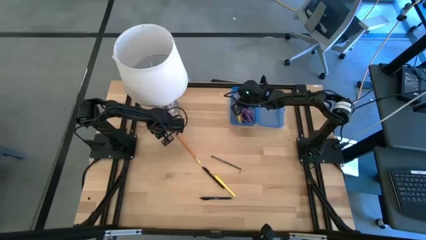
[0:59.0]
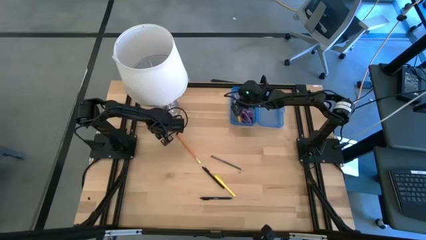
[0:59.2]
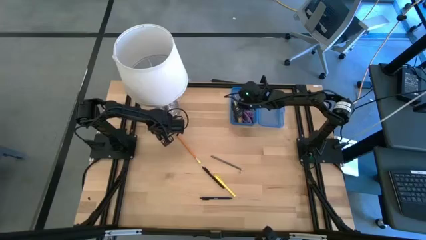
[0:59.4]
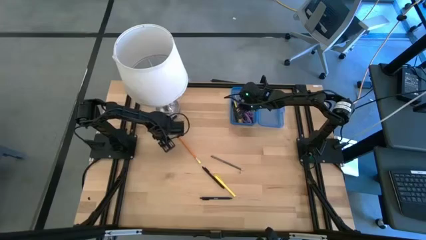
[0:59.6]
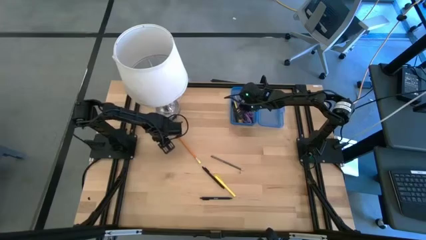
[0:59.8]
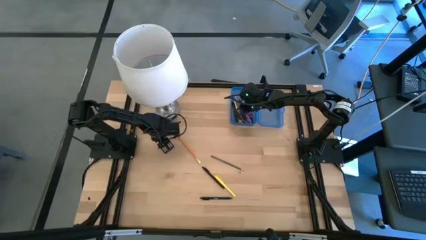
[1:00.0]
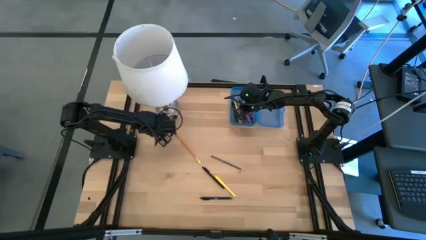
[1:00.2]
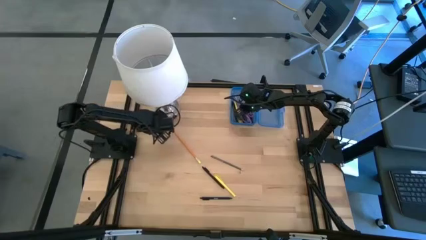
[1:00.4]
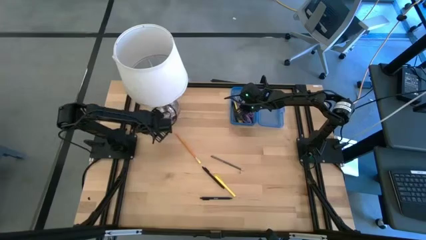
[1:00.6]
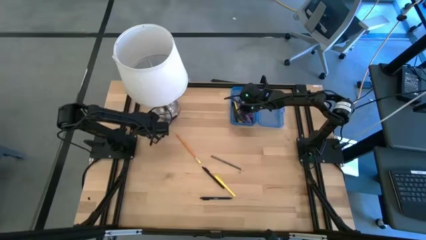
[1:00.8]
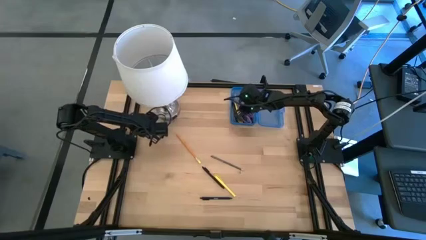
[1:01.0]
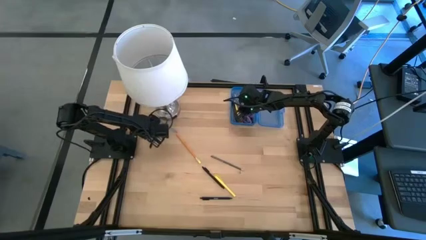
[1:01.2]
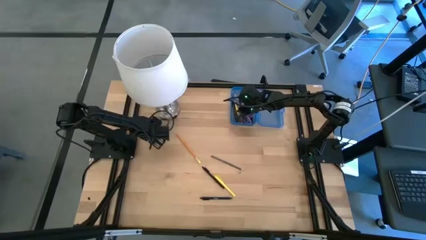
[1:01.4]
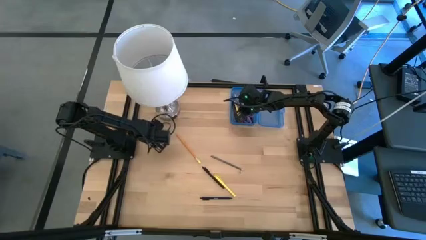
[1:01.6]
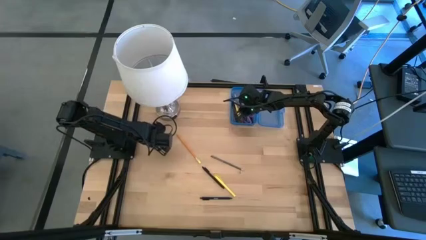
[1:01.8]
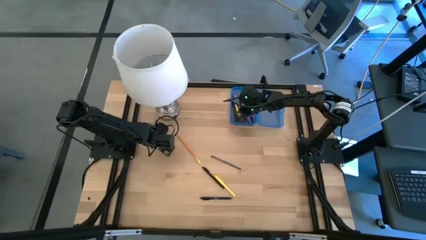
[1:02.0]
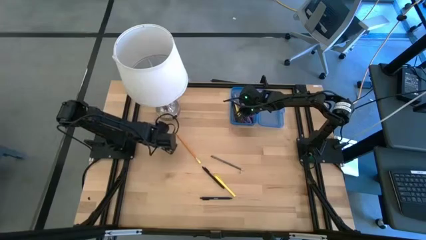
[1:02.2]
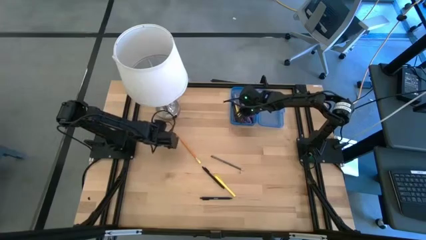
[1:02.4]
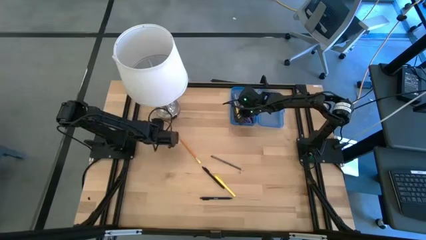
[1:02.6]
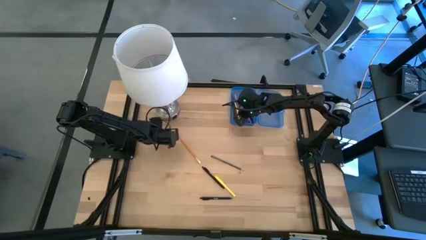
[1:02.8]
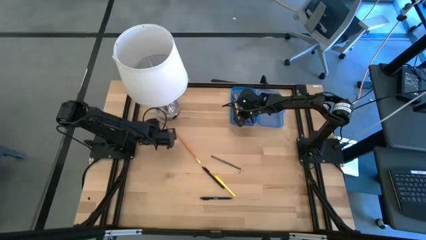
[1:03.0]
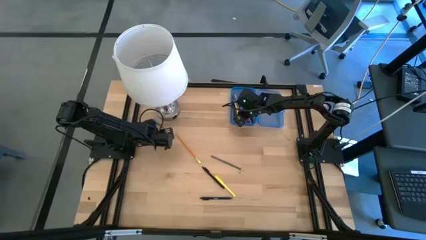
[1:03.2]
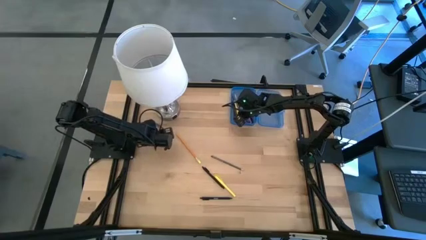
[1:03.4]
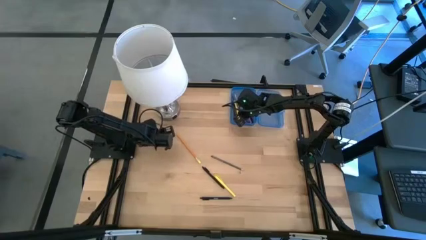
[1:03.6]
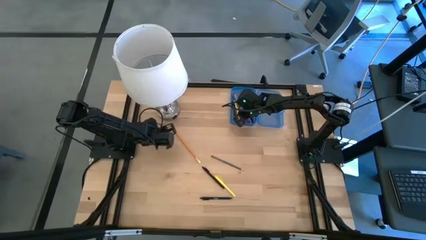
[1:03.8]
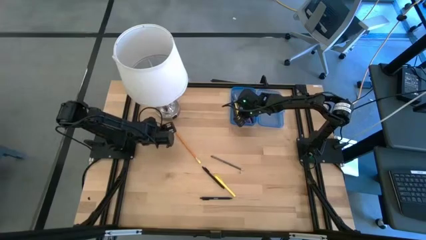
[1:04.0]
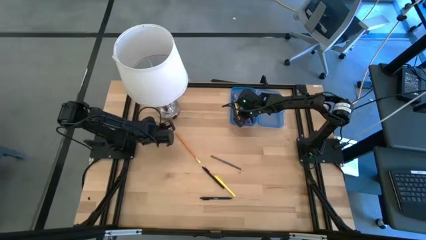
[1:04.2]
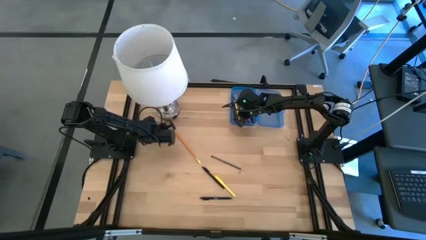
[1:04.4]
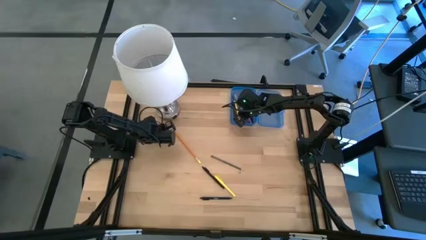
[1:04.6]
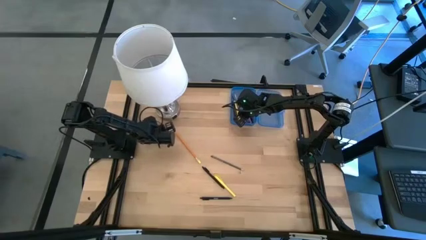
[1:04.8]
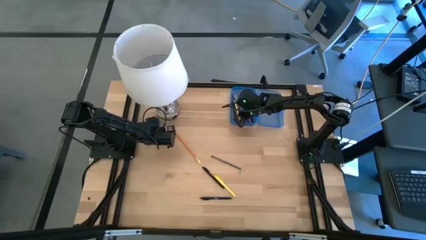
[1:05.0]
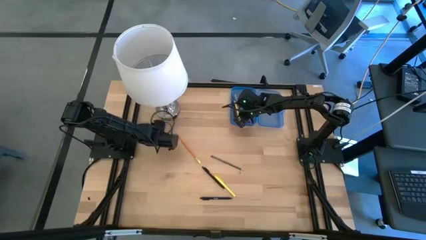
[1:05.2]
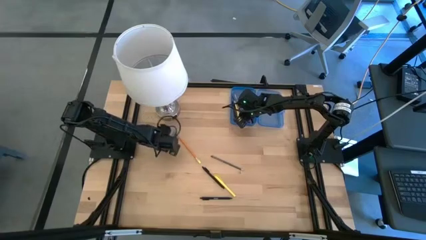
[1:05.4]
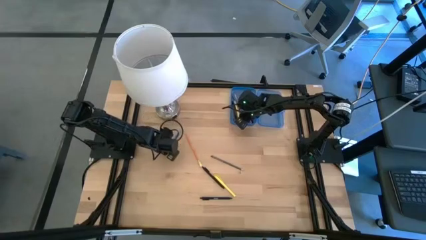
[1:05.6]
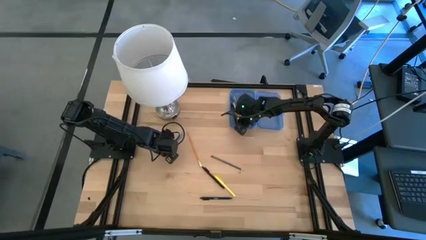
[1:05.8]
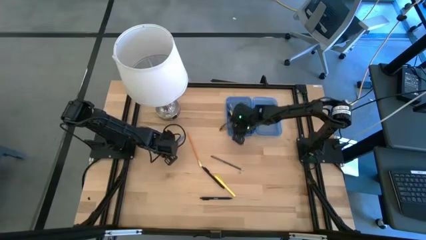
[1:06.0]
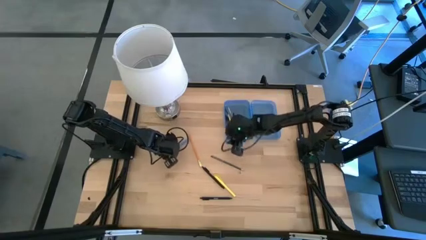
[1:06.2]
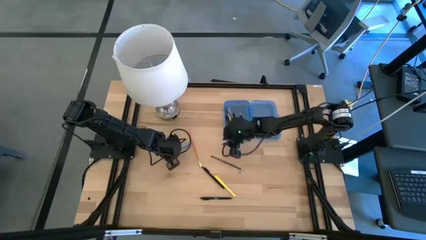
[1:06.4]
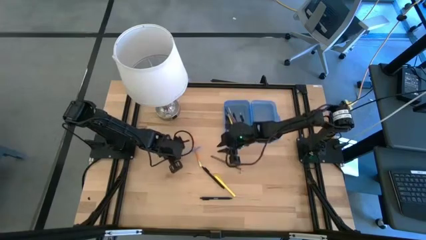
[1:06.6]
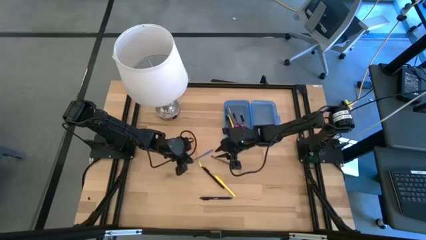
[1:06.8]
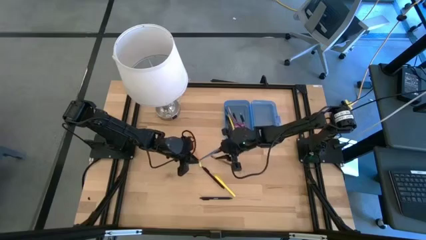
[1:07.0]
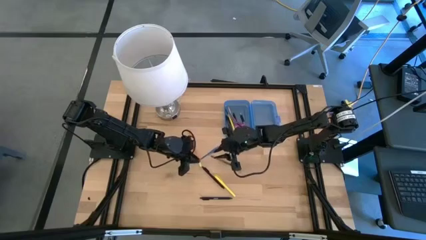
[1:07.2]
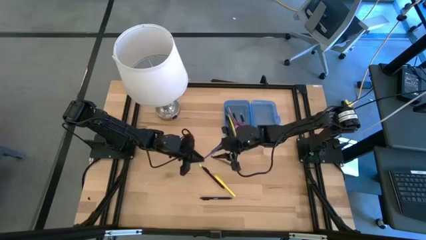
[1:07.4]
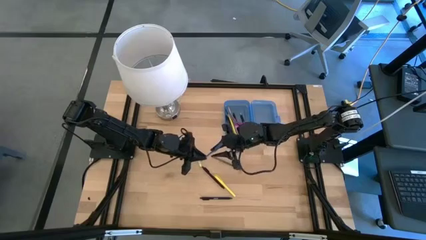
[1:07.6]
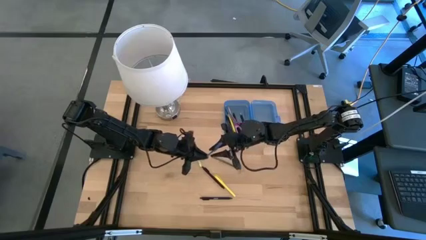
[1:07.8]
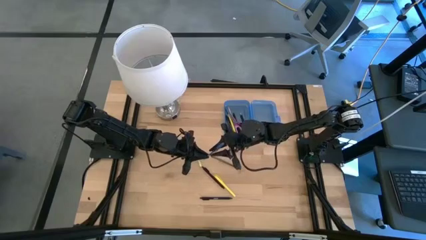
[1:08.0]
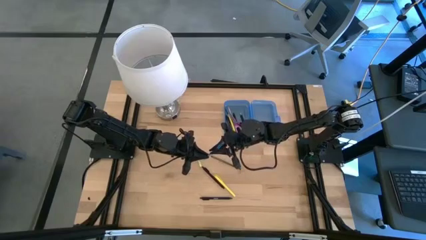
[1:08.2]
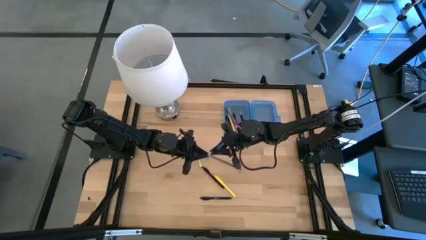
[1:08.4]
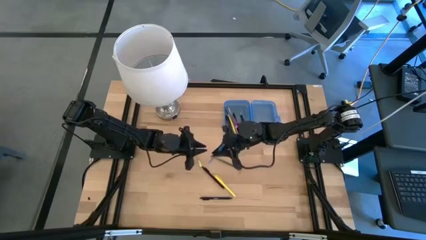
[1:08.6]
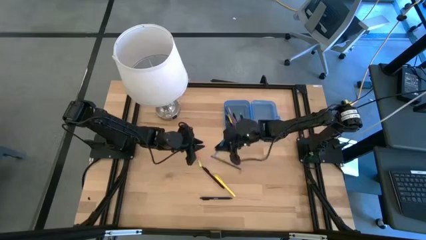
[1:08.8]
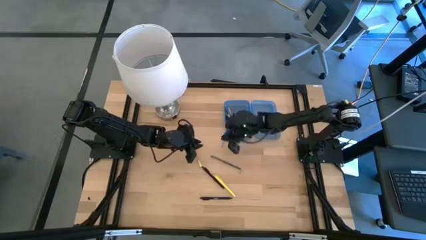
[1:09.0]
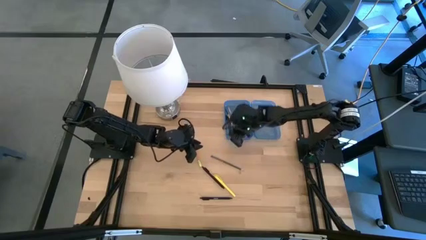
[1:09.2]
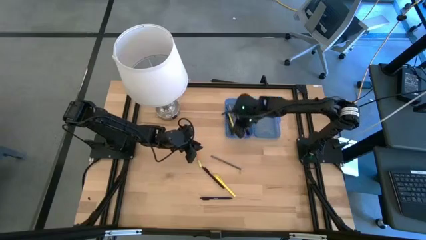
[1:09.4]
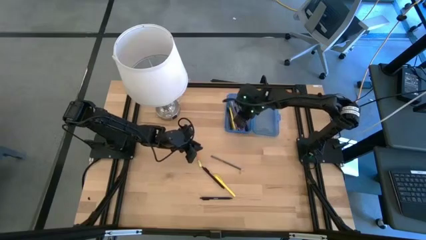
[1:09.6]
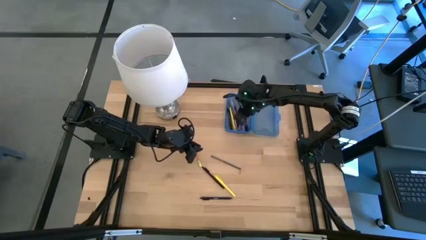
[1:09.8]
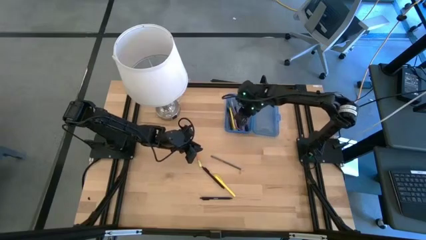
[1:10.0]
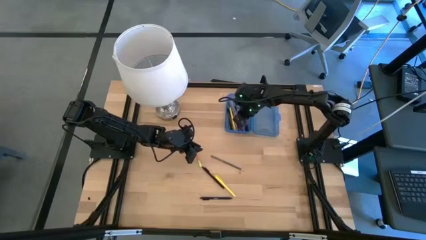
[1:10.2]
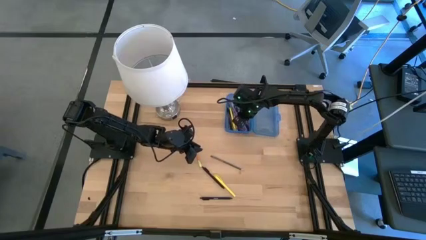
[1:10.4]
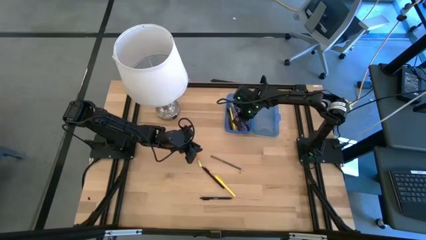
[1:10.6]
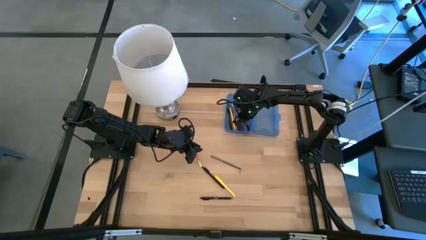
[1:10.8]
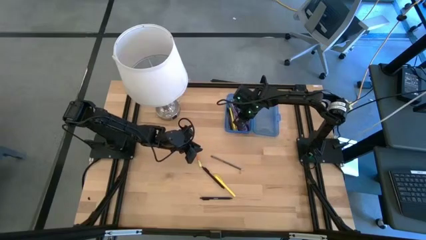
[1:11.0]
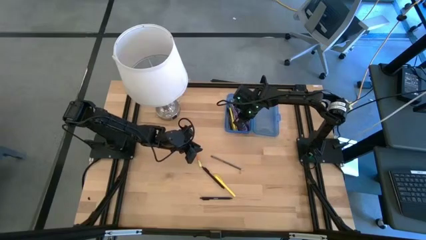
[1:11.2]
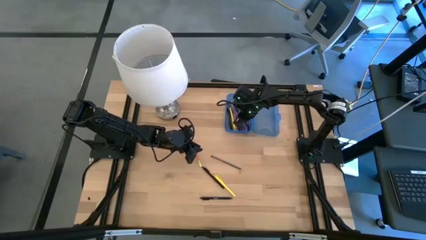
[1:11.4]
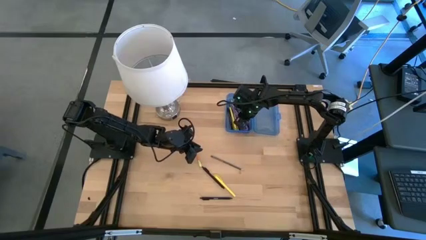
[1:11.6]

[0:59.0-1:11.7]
Task: Pick & place school supplies into a supply box
Put the blue pen into the blue supply box
